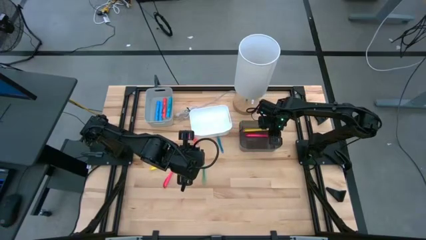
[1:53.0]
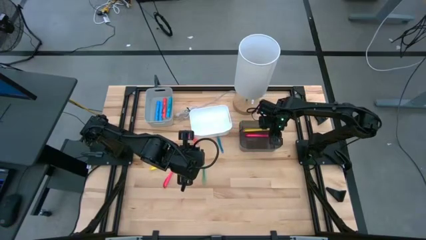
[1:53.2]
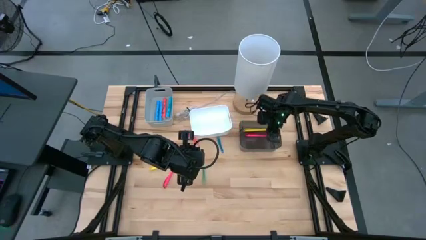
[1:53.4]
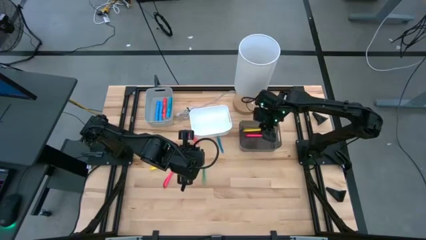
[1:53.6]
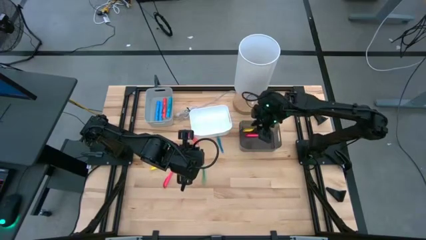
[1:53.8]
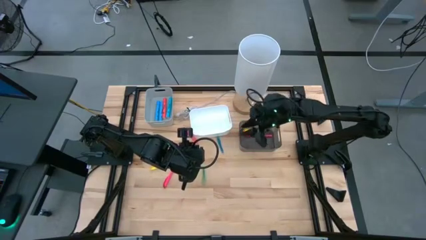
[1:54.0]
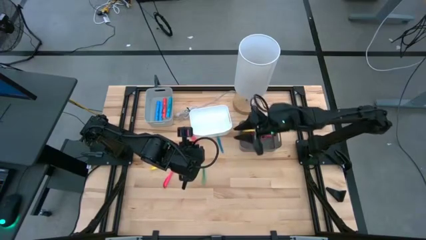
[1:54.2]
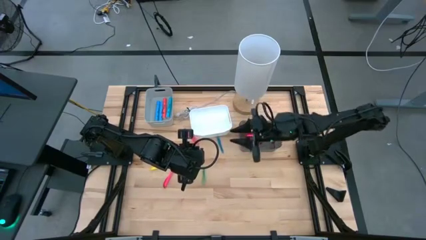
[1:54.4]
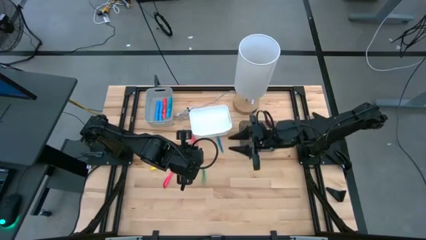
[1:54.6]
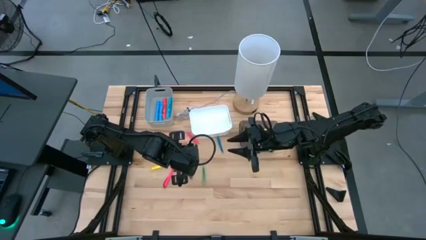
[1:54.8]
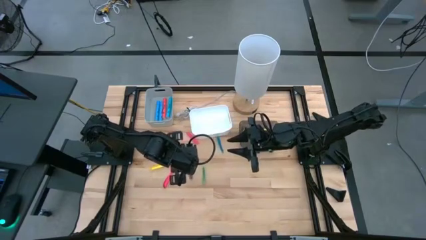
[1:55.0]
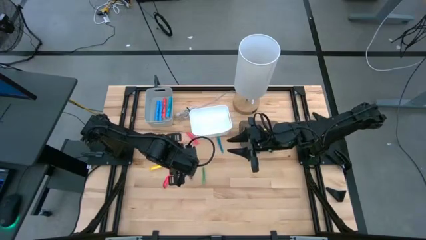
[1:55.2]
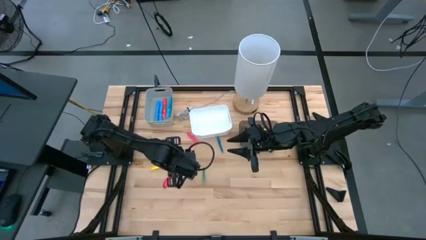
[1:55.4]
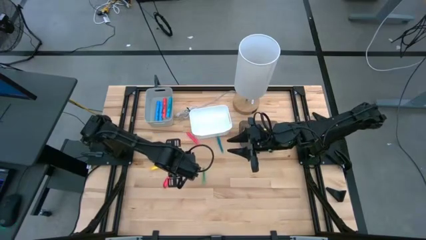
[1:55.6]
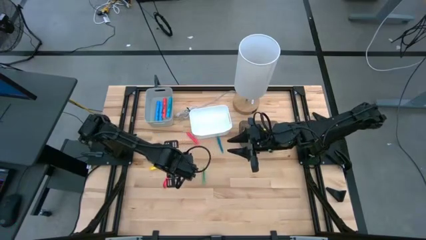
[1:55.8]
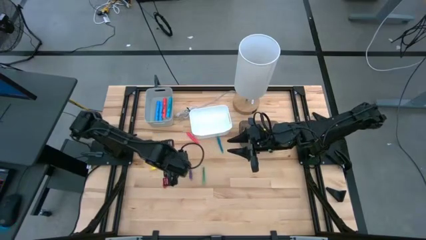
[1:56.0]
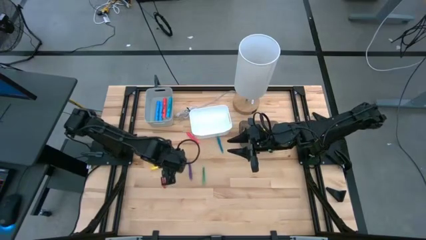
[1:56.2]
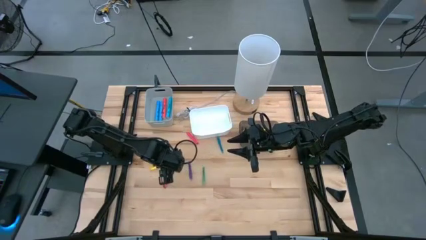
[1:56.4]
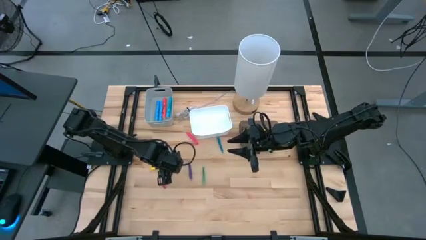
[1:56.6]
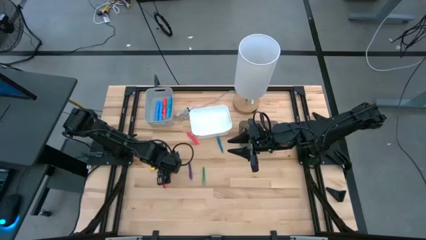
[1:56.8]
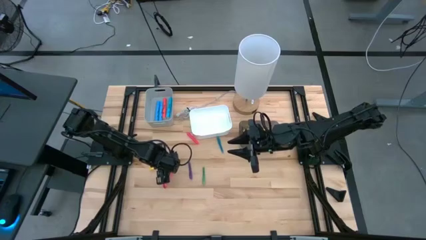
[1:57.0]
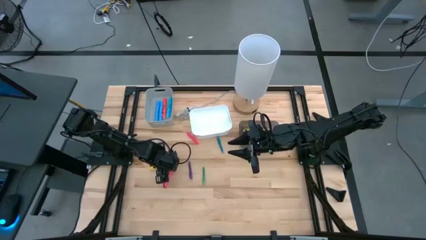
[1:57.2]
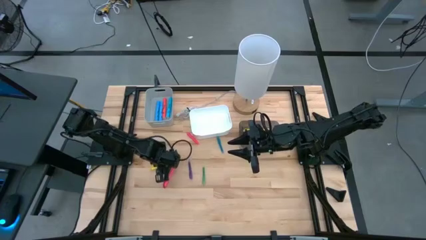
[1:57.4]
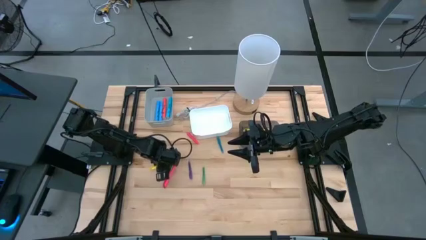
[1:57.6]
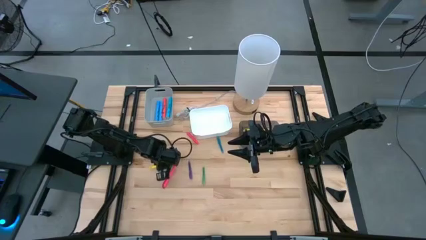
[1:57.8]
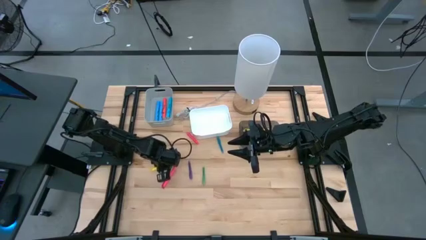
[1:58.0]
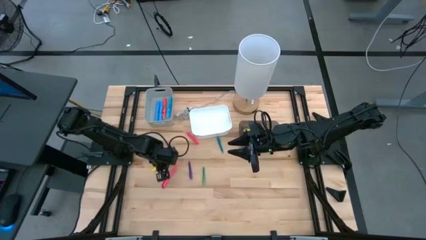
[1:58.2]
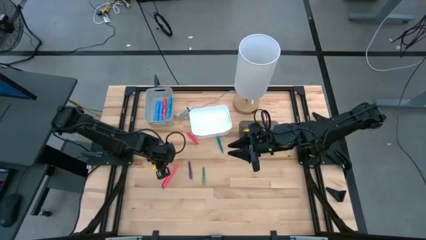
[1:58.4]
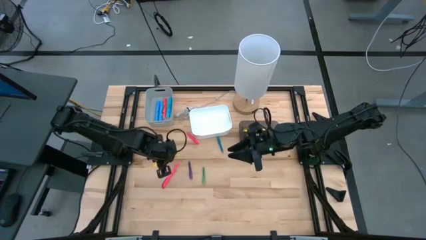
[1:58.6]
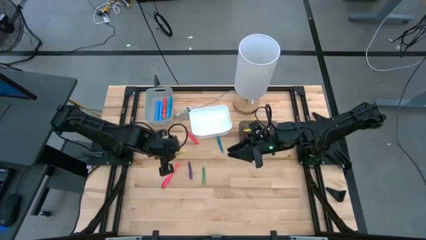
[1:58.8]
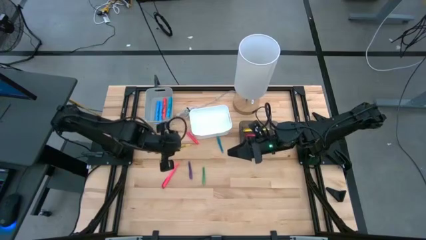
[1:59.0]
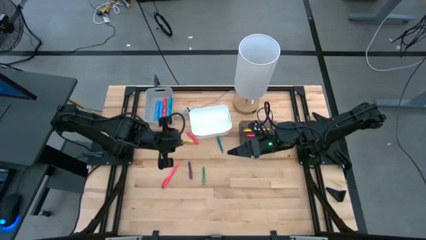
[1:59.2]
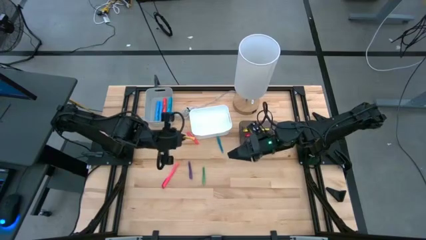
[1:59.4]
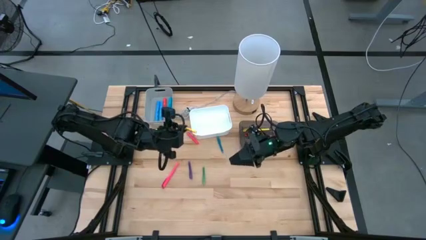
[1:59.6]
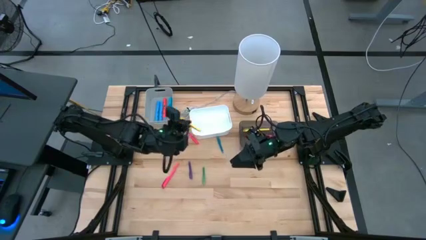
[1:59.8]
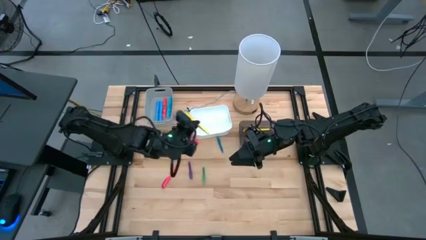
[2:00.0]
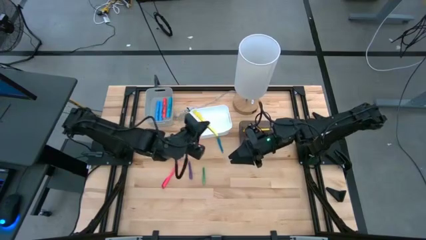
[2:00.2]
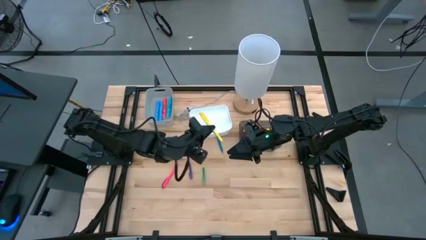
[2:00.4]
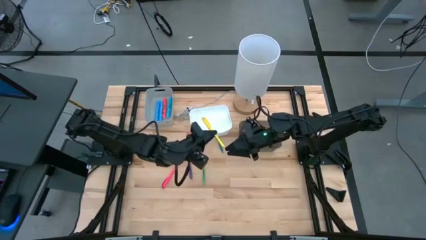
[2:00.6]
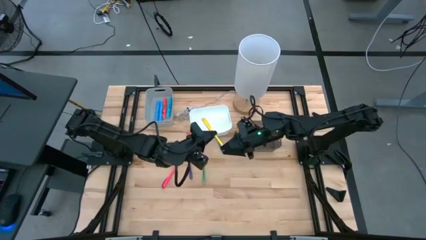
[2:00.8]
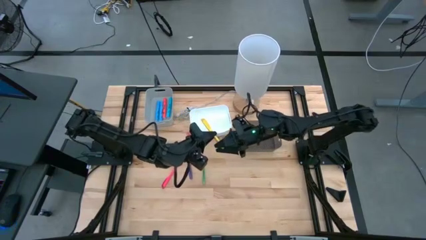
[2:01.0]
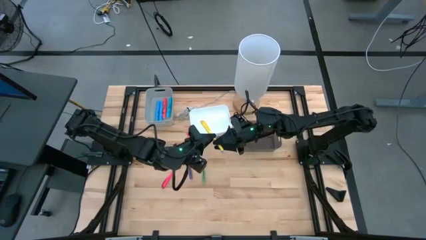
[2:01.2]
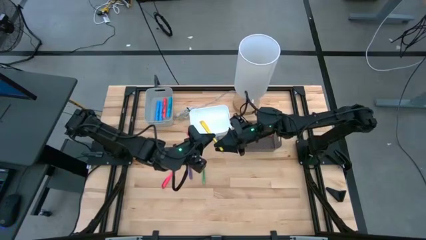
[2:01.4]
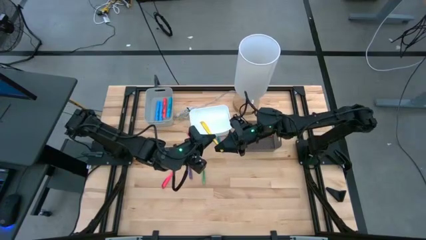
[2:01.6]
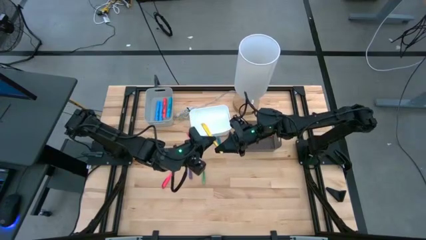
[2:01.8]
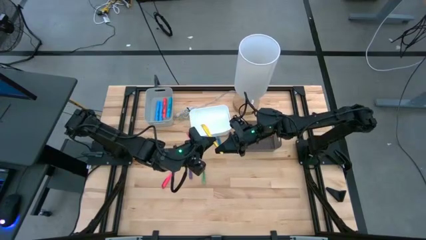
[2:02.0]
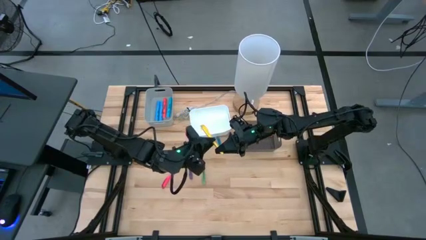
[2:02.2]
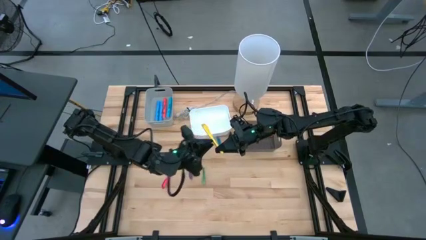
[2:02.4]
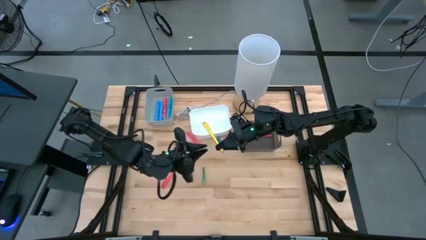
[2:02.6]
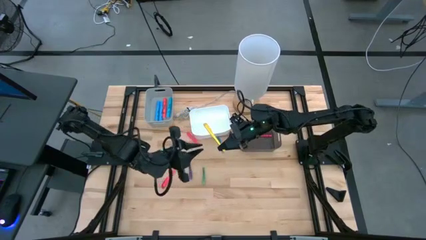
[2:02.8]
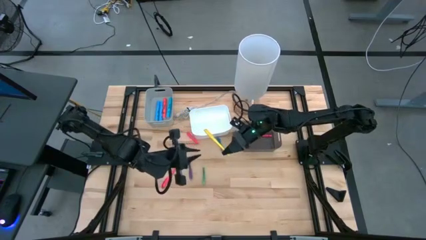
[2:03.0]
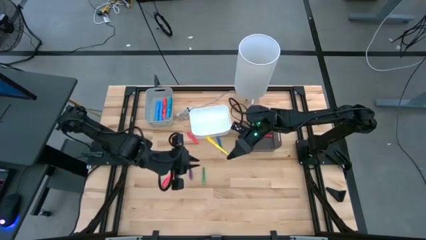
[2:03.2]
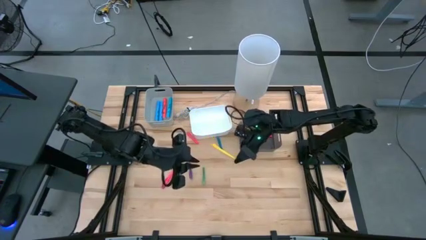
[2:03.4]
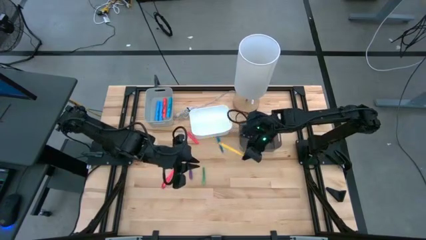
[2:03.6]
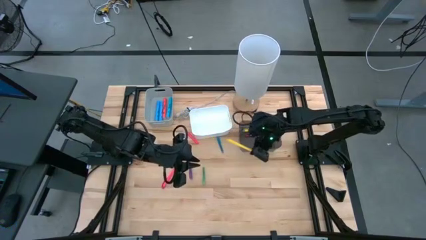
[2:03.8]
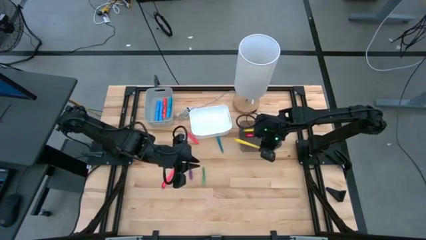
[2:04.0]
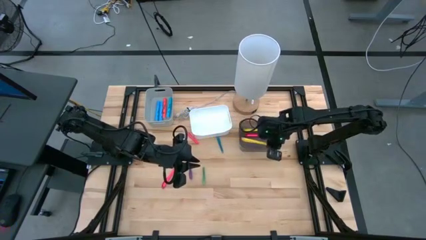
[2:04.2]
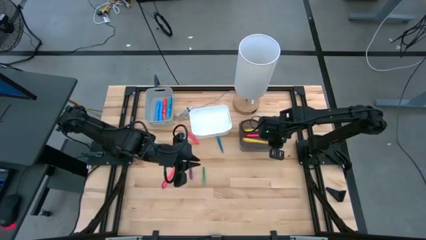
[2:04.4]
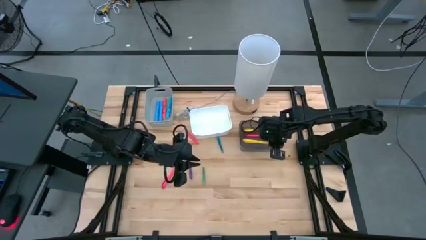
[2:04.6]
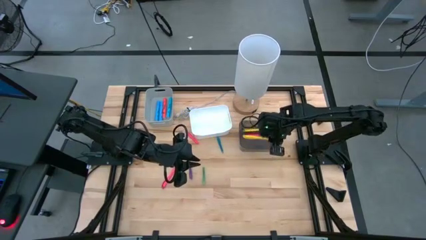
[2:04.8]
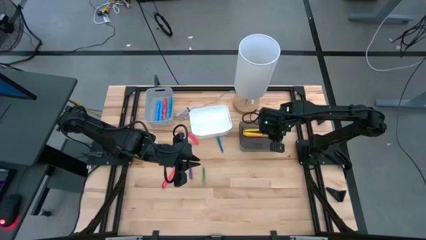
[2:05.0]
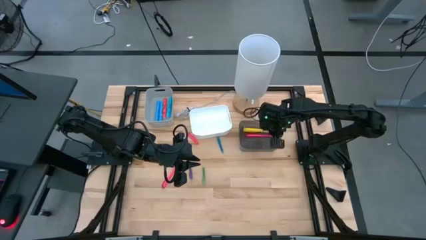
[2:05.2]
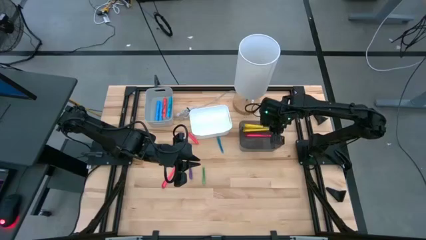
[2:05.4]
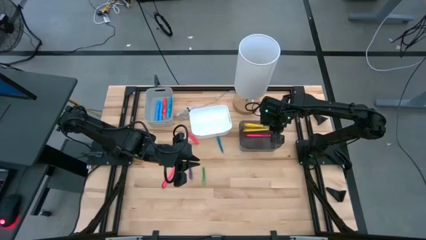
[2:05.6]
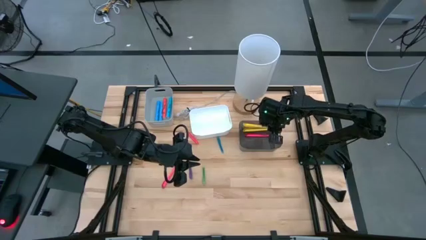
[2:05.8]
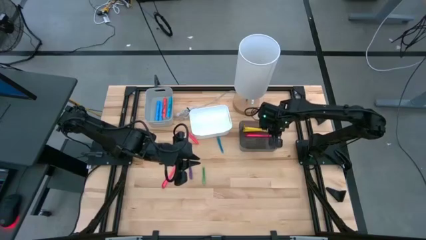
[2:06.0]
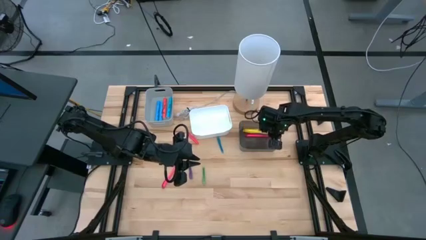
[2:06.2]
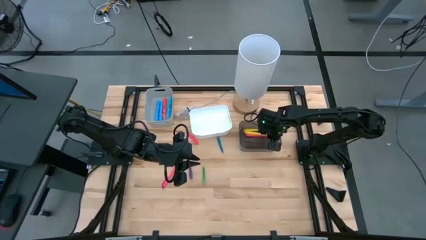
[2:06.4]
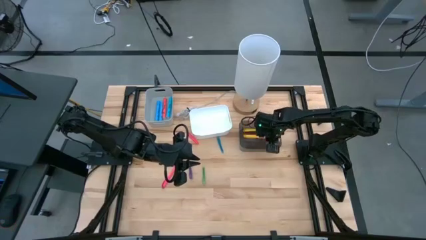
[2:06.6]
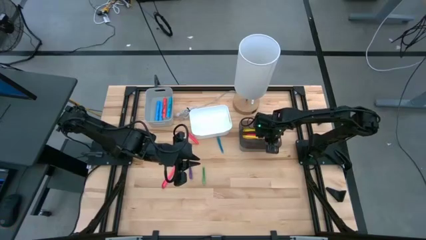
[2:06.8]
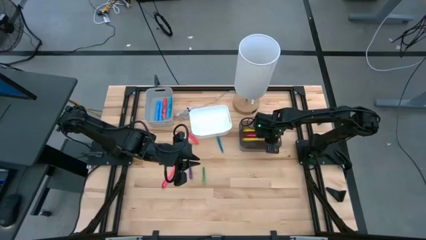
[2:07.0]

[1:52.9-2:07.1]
Task: Pick & Place Markers
Put the yellow pen into the black transparent bin
